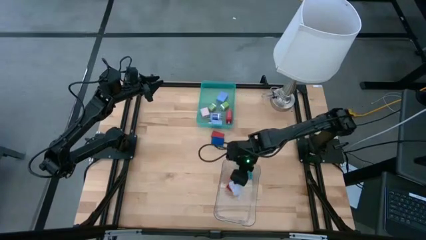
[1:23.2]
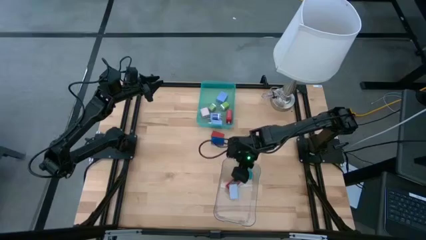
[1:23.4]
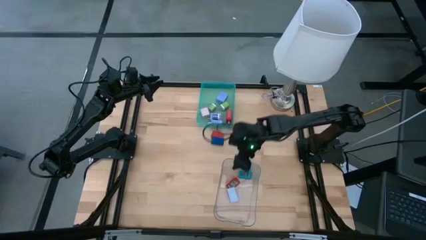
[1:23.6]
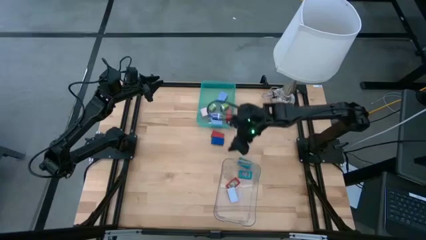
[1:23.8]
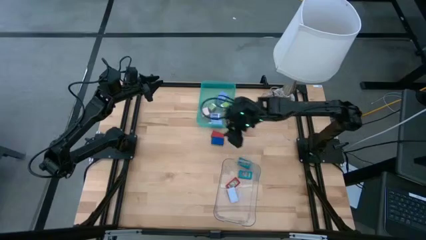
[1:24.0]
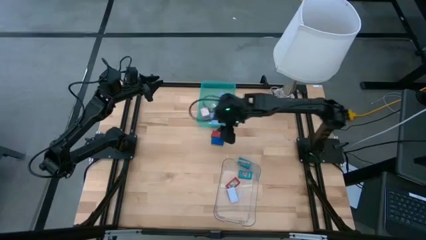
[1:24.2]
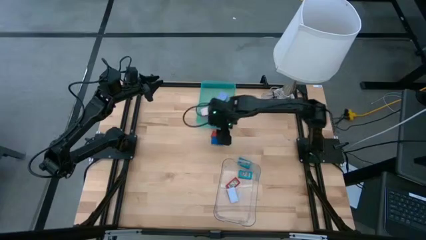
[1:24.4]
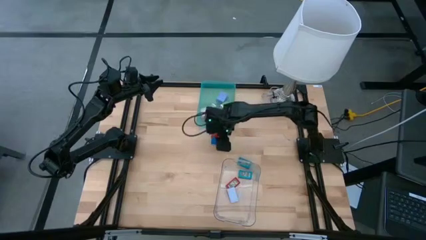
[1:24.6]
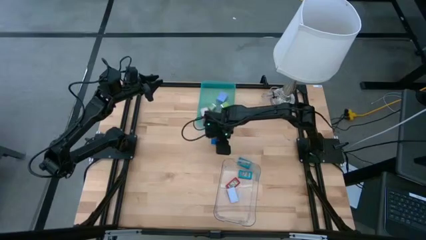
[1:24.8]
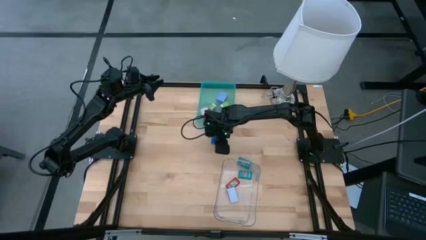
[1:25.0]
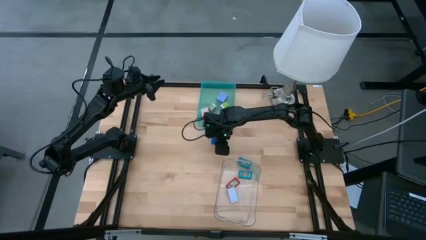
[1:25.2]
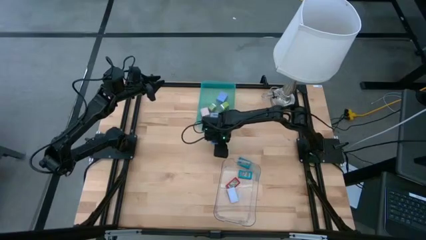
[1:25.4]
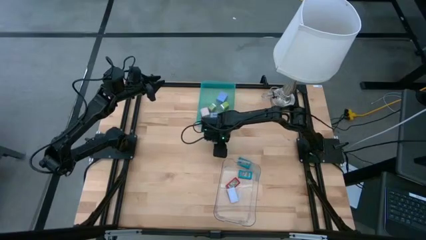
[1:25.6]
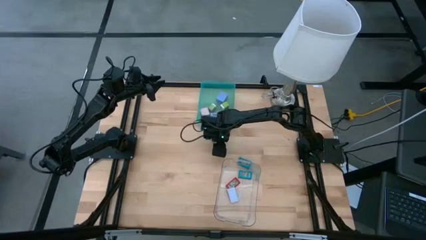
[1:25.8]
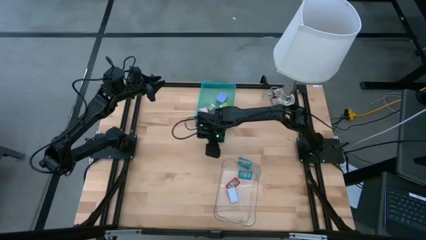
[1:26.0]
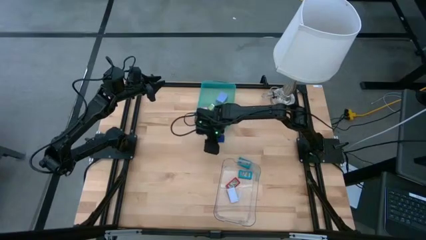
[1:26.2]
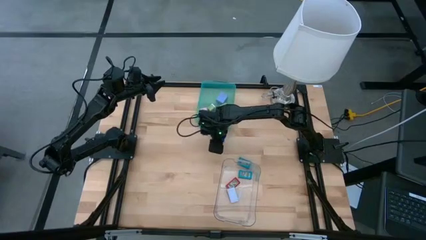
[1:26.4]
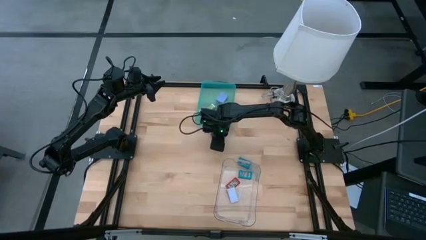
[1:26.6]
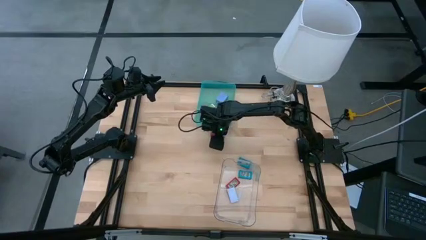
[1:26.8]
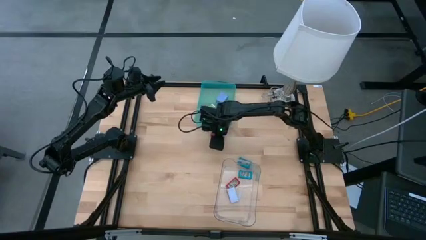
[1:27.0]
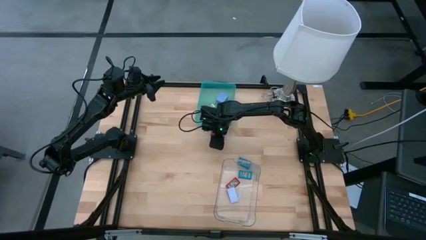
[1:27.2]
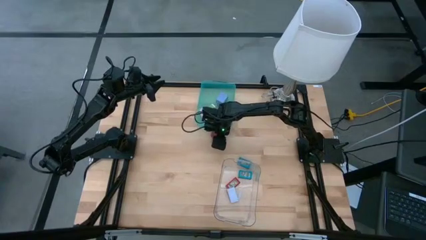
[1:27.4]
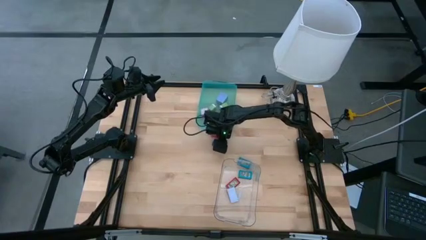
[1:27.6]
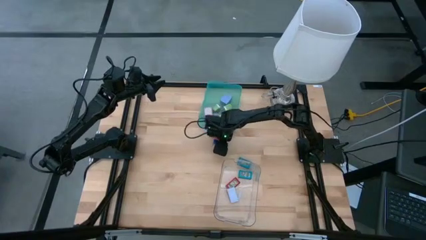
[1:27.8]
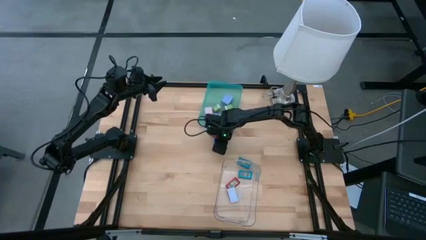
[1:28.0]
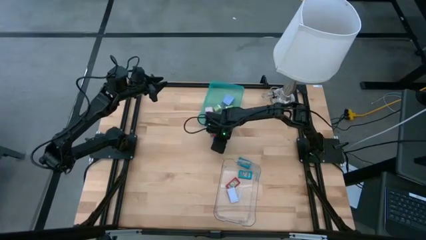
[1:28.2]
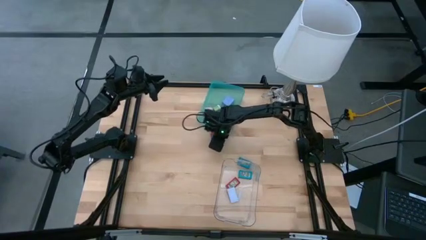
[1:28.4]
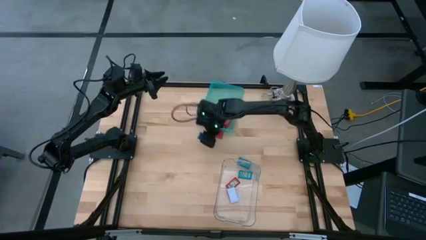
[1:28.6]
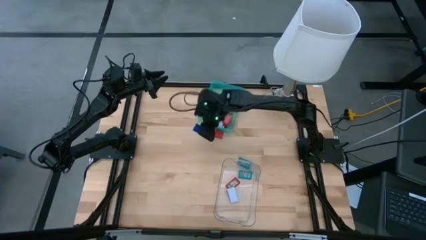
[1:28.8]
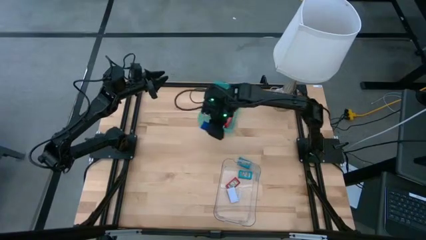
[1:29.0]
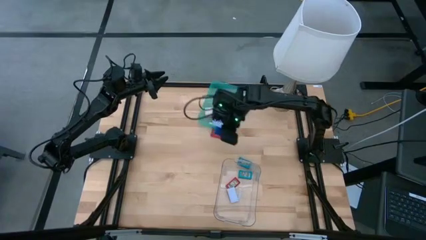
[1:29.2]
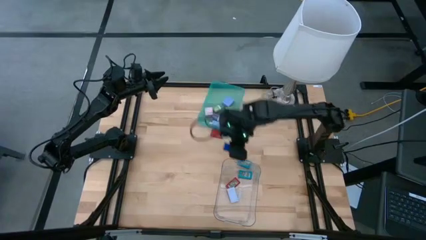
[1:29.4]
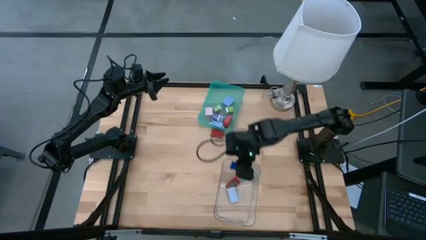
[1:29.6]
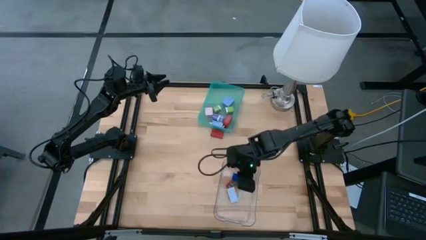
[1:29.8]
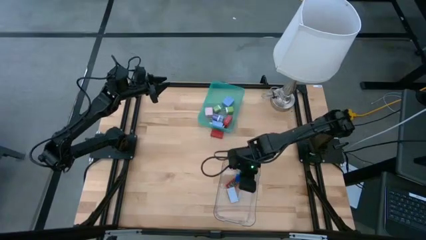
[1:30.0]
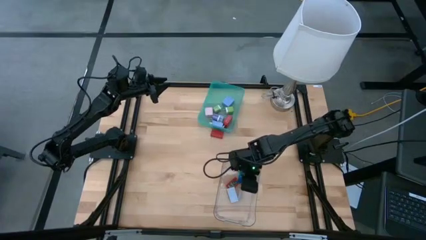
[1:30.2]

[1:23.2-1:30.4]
Task: Pick & Place Office items
Put the dark blue digital timer into the transparent bin

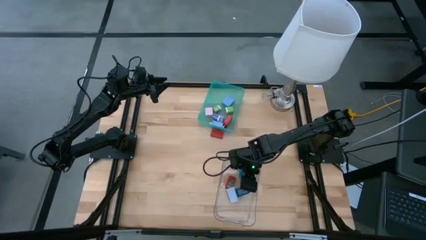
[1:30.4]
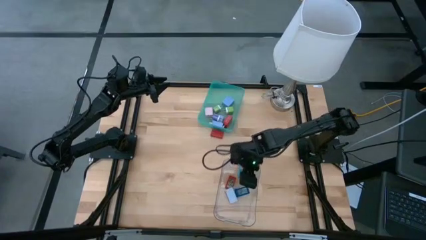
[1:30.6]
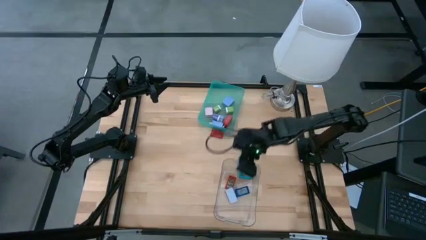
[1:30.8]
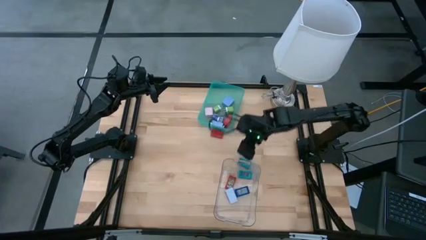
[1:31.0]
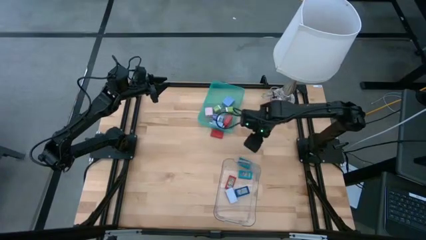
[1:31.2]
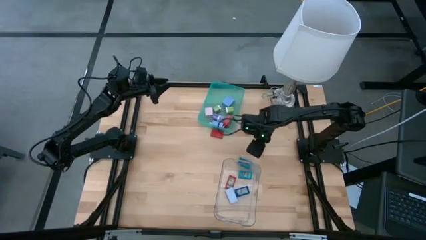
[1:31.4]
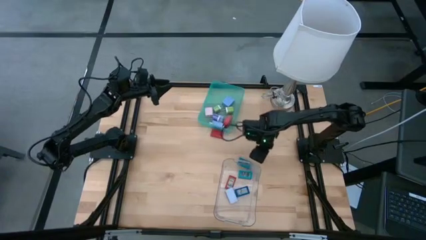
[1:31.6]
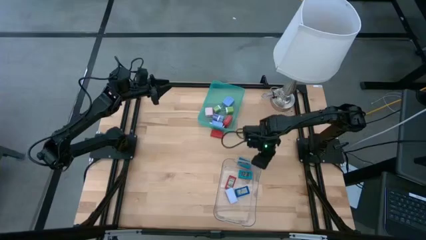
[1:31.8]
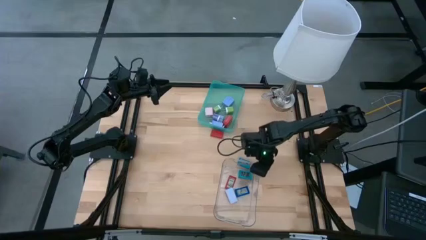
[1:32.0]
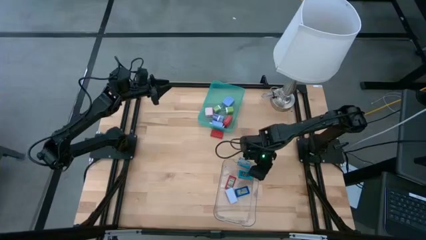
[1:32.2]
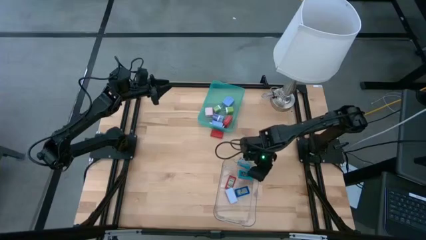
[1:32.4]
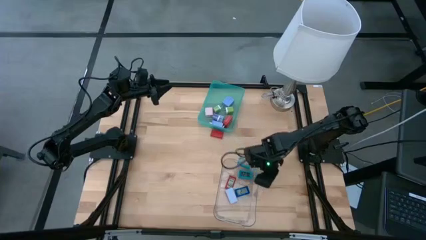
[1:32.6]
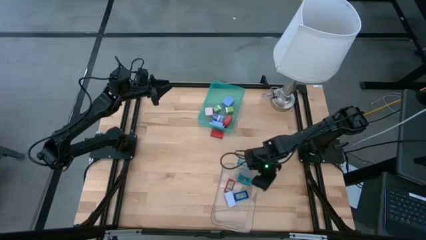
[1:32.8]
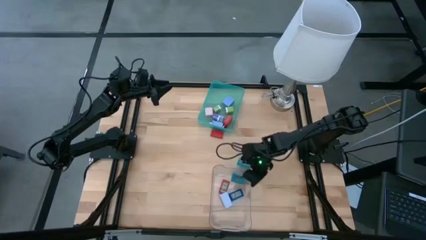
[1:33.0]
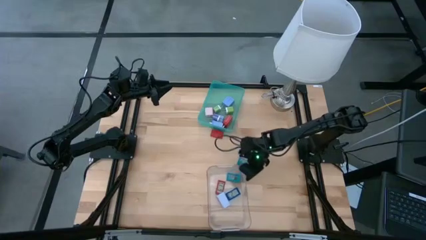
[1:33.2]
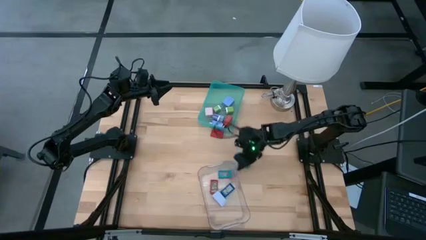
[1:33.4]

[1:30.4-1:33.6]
Adjust the transparent bin

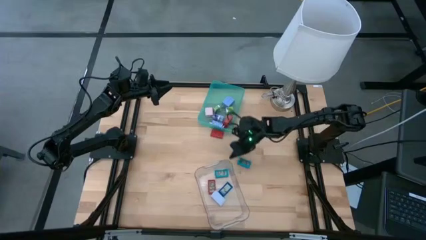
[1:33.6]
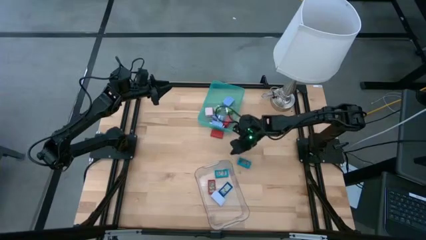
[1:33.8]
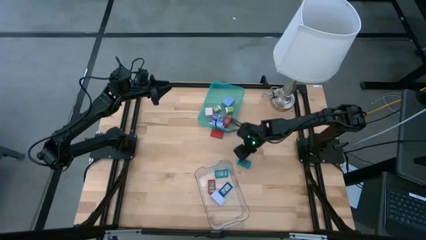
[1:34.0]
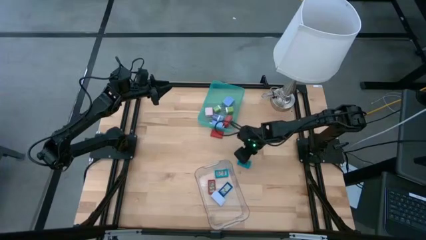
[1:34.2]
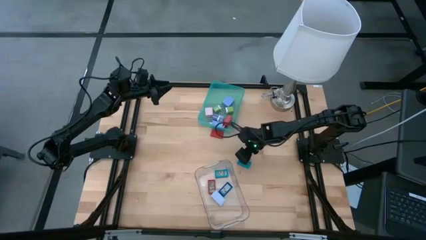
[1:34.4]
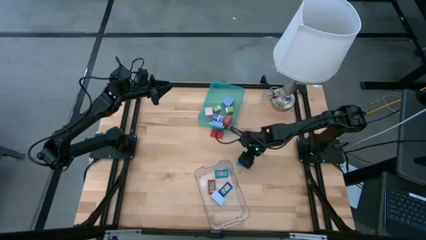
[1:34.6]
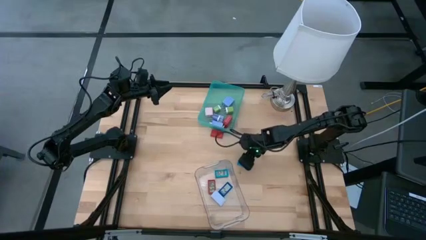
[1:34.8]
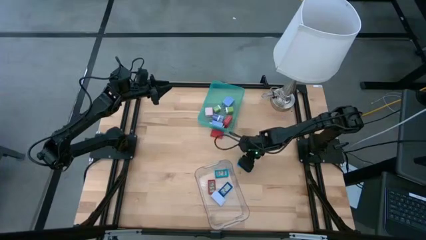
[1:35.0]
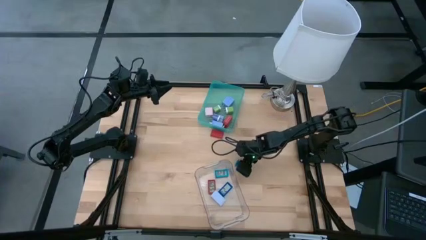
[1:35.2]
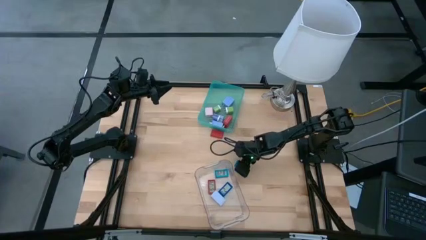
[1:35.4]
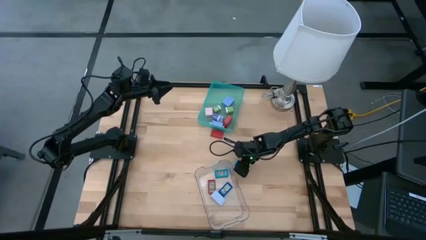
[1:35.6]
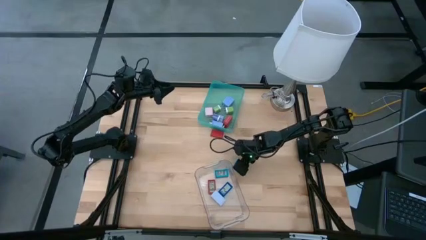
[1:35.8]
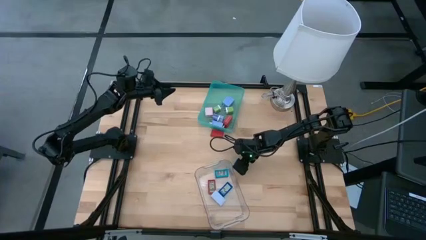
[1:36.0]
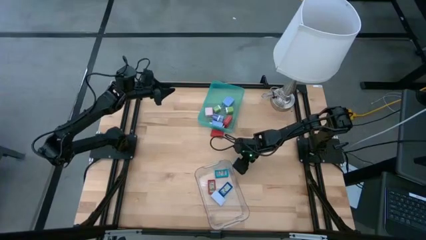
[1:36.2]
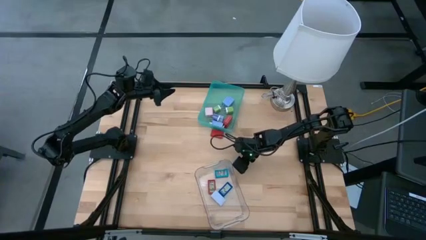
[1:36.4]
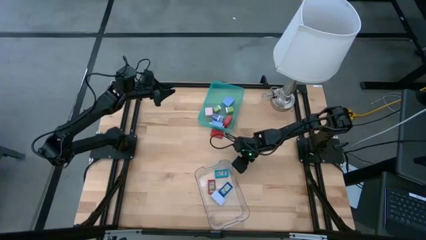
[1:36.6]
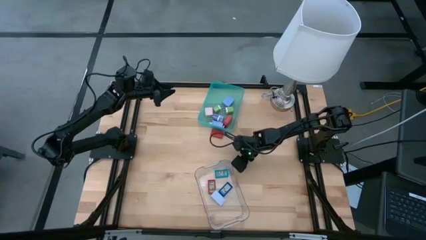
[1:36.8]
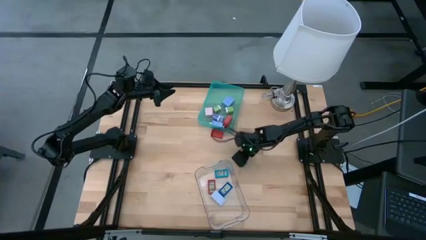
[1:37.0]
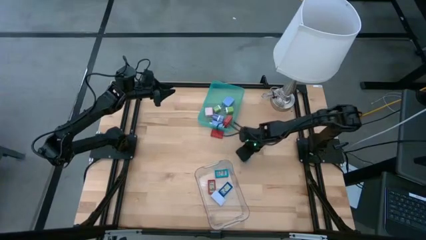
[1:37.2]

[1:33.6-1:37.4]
Put the blue digital timer into the transparent bin

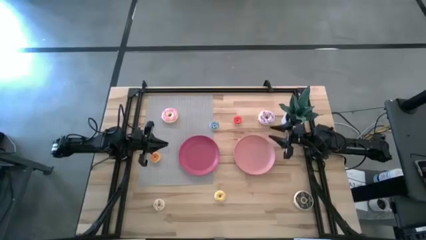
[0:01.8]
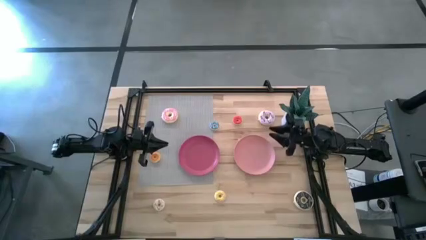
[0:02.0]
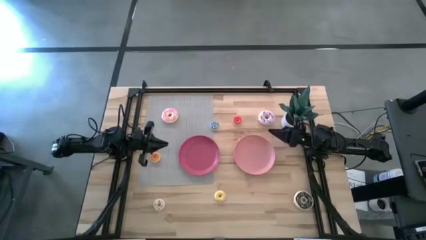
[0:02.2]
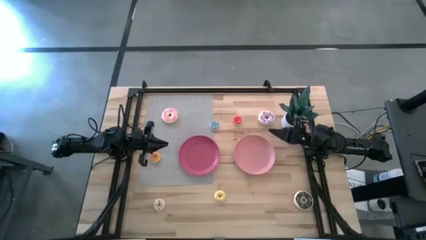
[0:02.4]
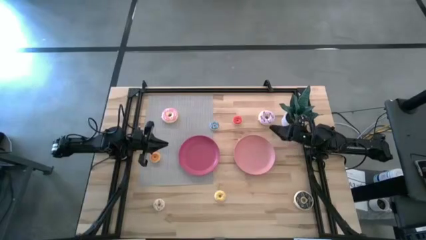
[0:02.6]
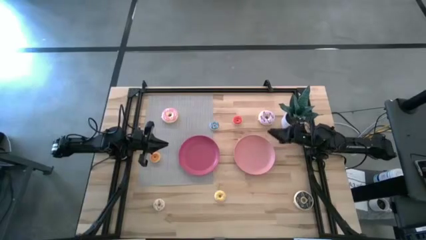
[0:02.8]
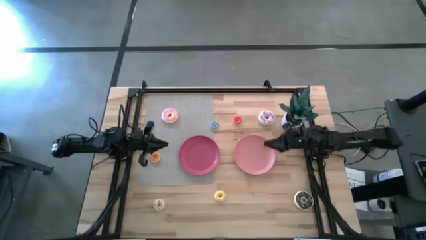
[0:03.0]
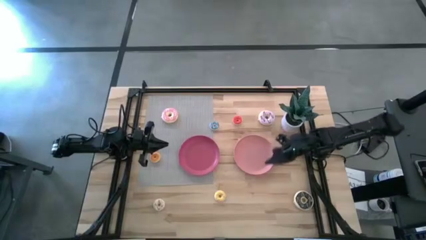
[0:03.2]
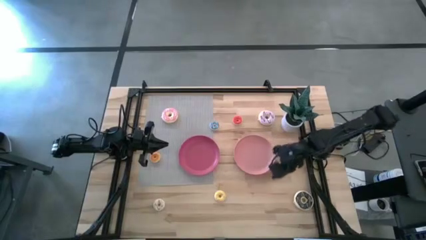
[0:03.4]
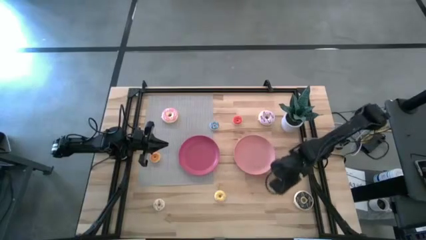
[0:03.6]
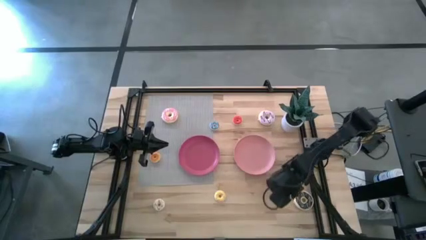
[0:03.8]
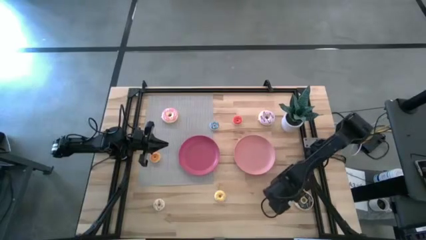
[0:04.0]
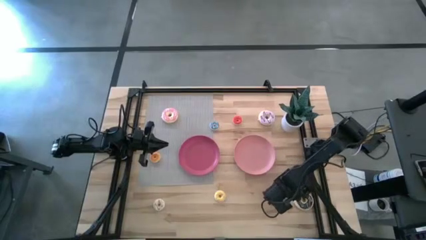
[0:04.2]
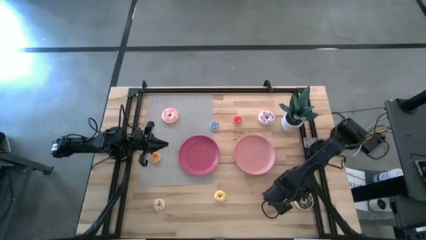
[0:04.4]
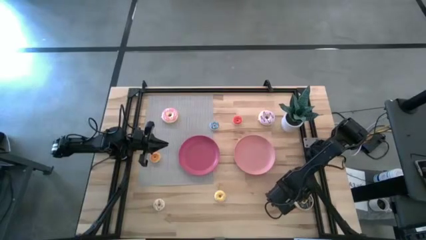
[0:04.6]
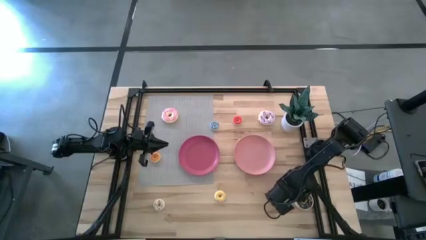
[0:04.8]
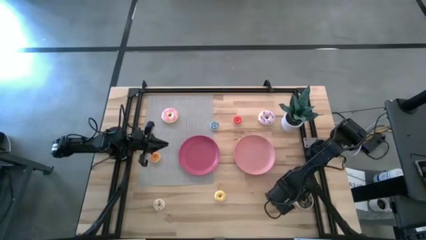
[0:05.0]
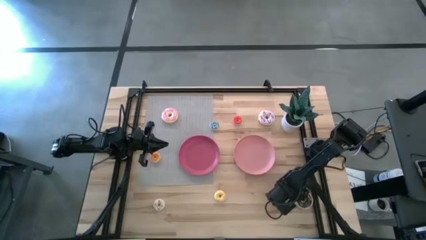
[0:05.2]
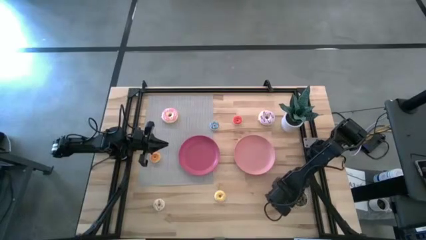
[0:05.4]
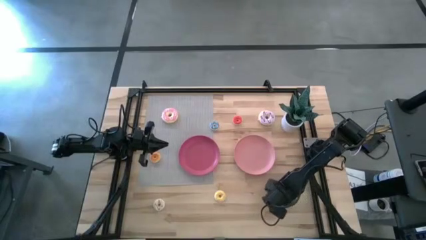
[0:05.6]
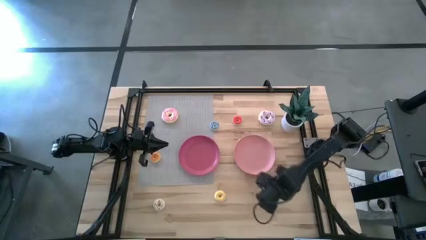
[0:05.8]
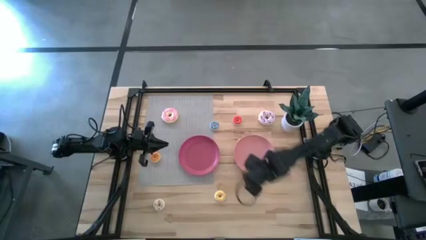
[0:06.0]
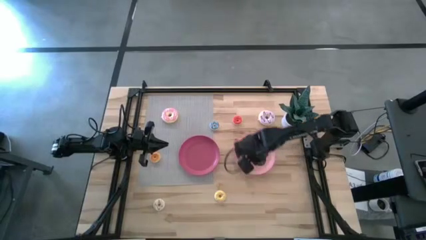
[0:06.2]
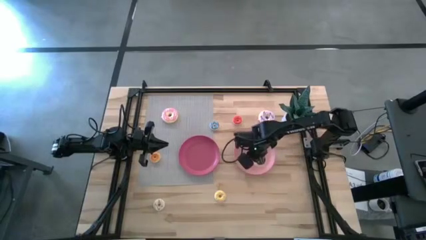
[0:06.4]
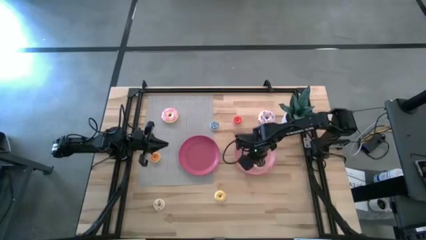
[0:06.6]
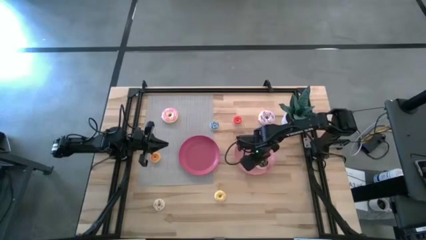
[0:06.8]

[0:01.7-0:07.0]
Task: Pick & Place donuts
Put the big black doughnut into the light pink plate
